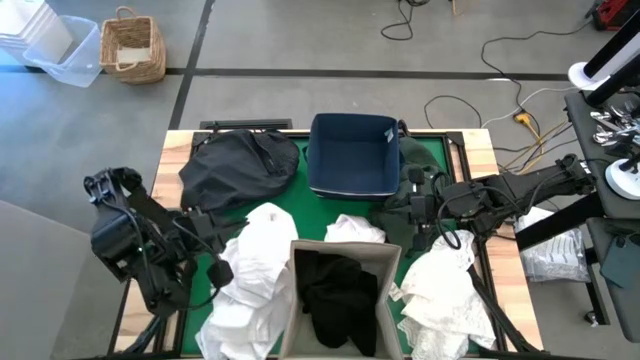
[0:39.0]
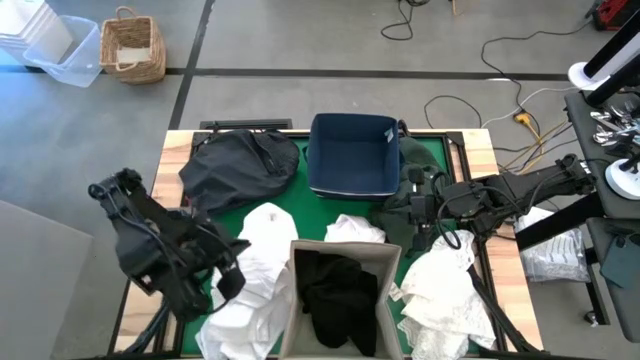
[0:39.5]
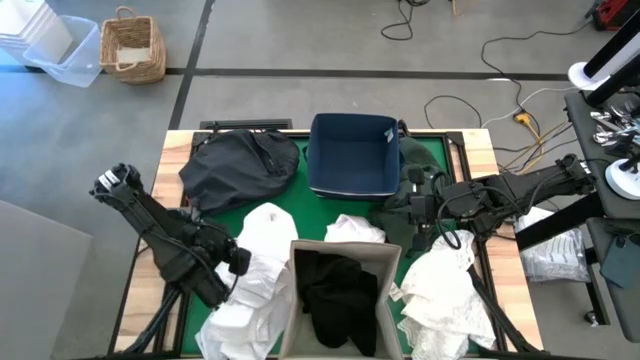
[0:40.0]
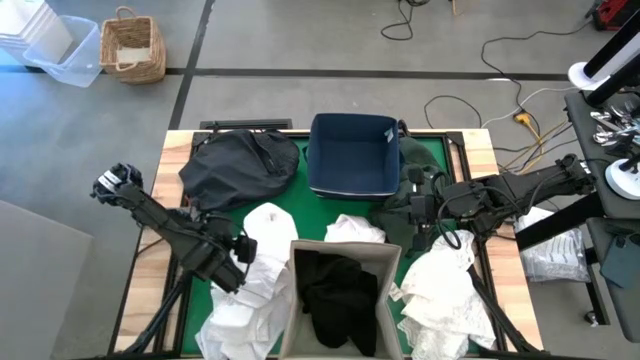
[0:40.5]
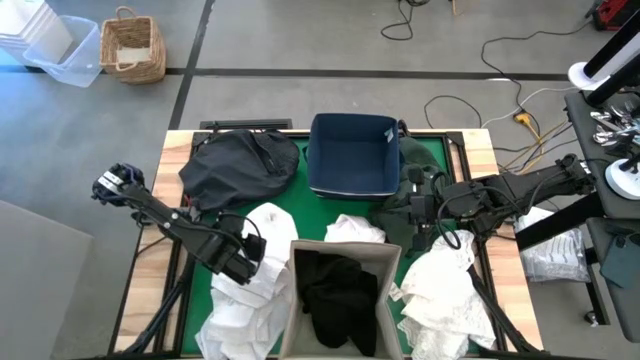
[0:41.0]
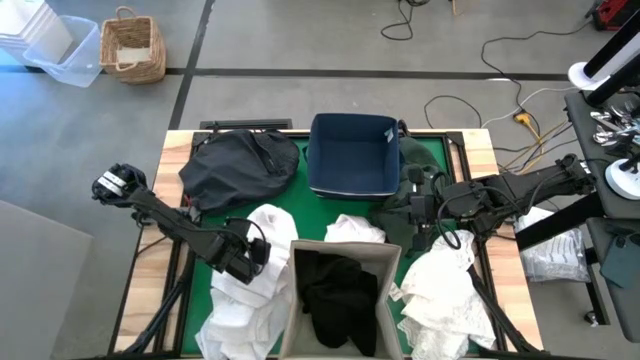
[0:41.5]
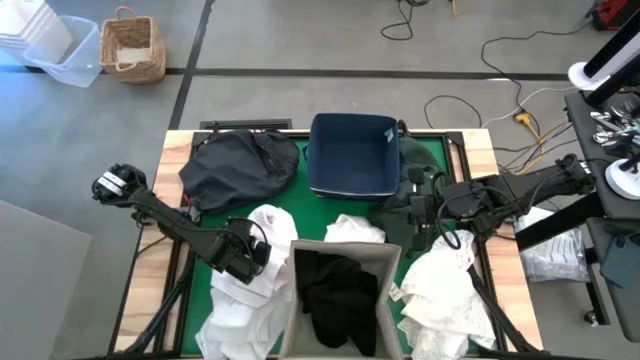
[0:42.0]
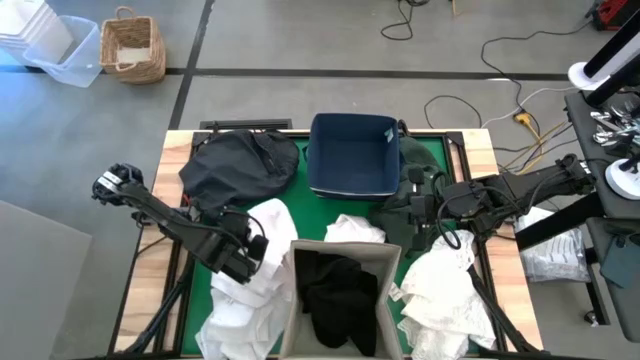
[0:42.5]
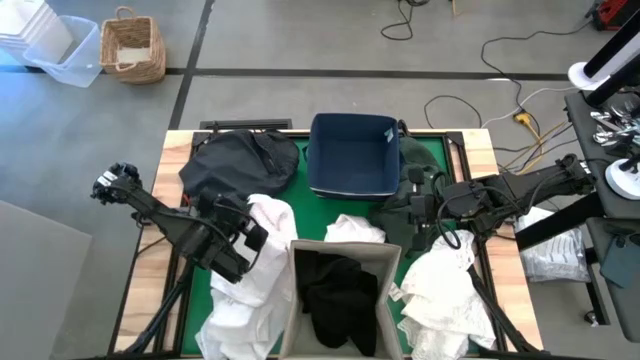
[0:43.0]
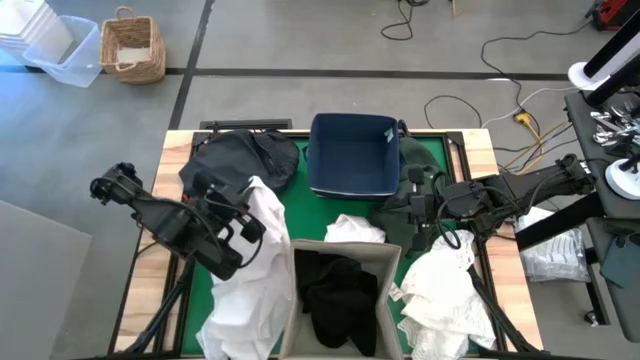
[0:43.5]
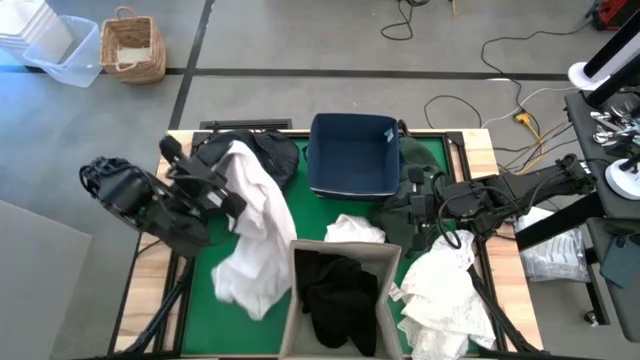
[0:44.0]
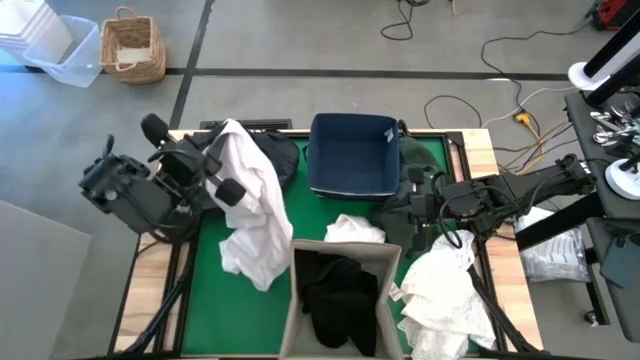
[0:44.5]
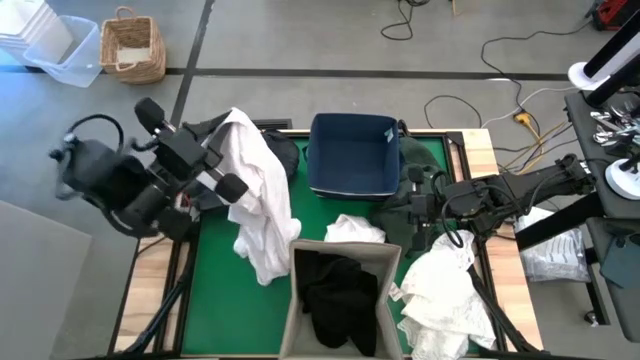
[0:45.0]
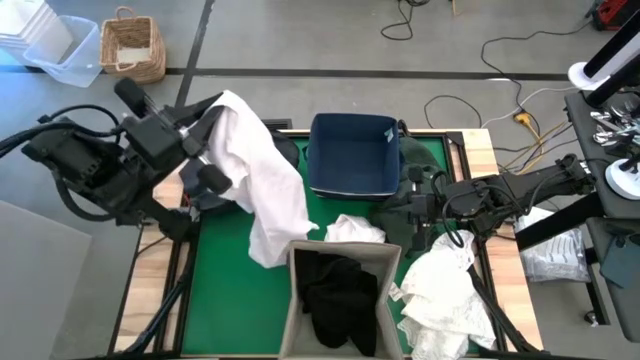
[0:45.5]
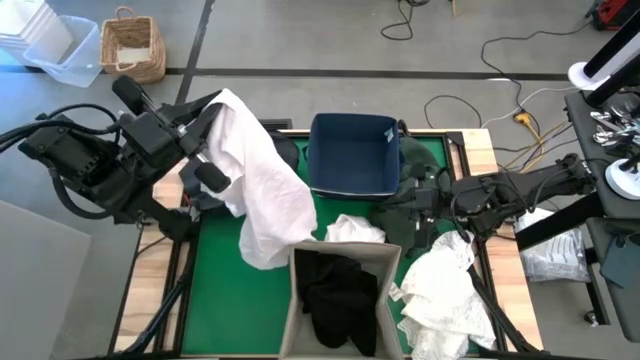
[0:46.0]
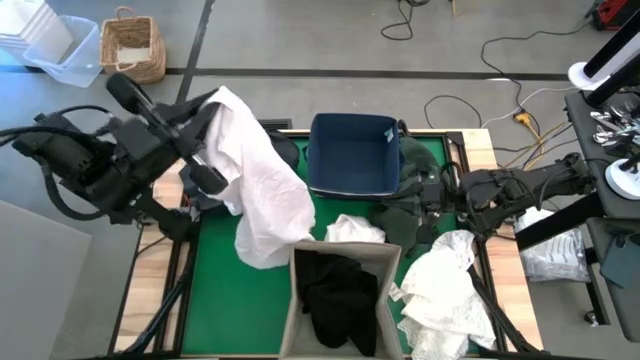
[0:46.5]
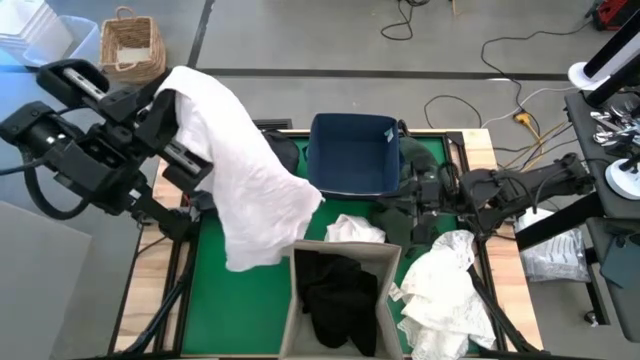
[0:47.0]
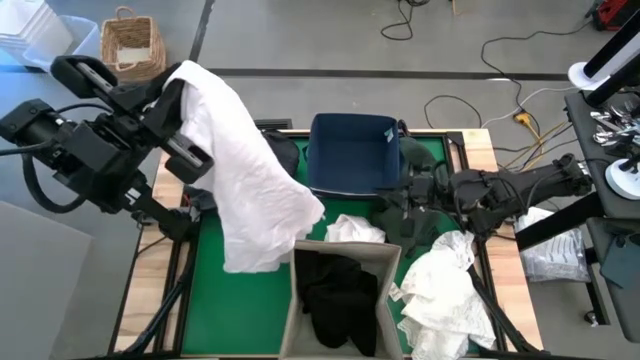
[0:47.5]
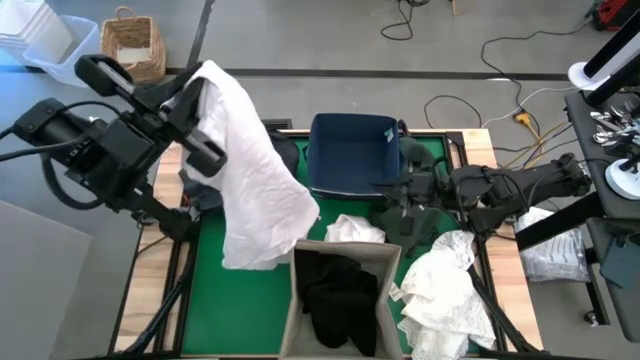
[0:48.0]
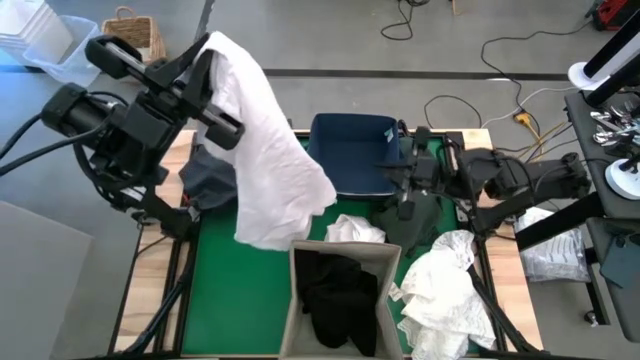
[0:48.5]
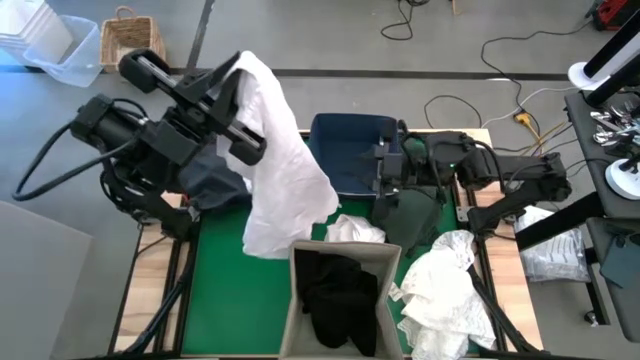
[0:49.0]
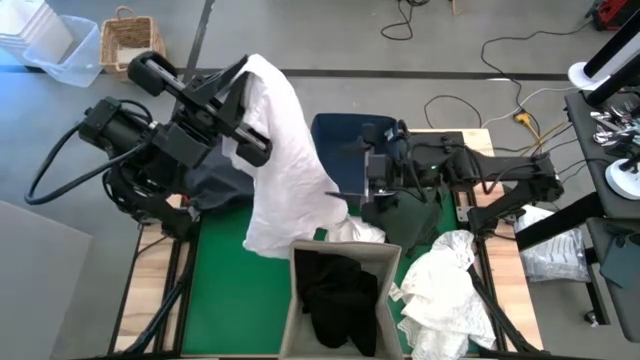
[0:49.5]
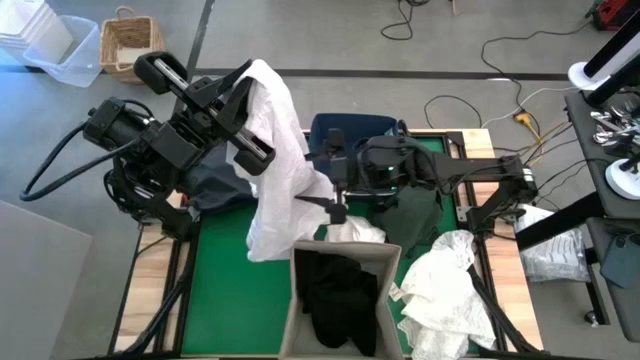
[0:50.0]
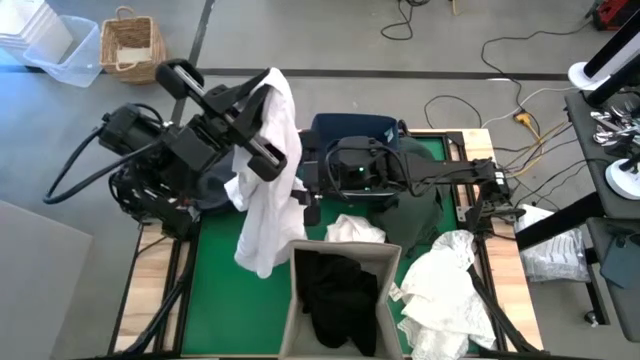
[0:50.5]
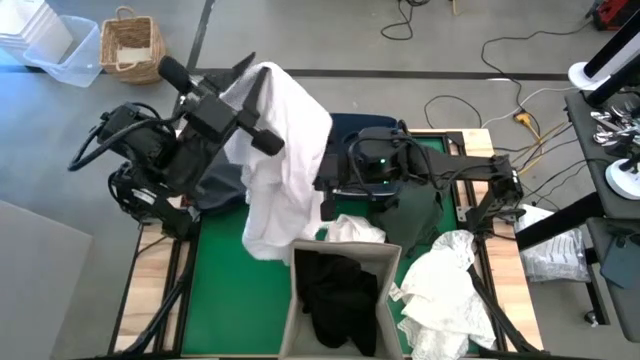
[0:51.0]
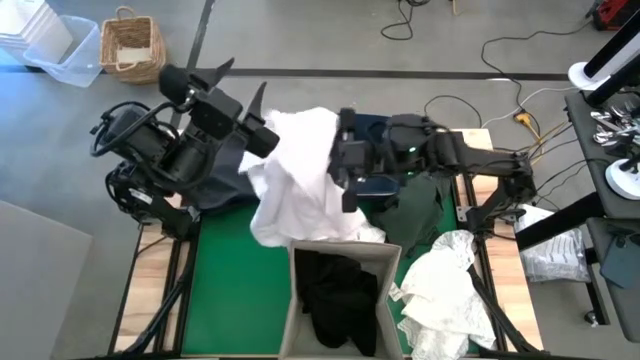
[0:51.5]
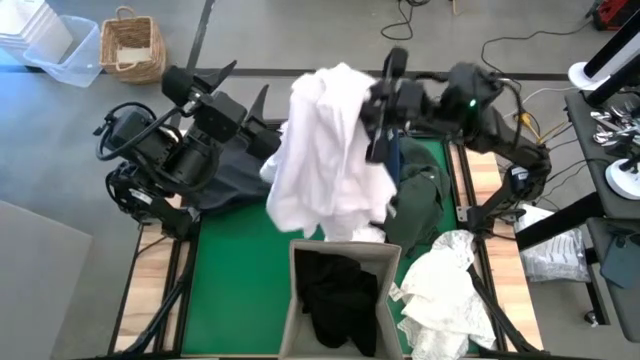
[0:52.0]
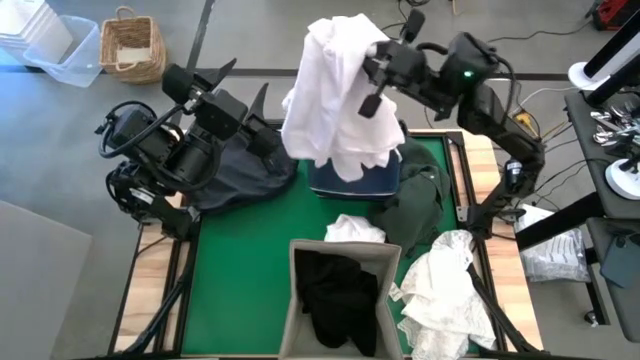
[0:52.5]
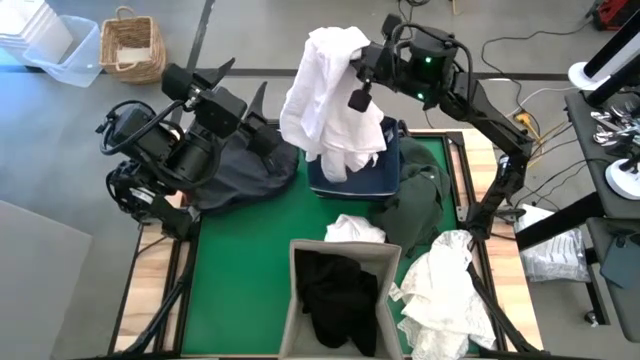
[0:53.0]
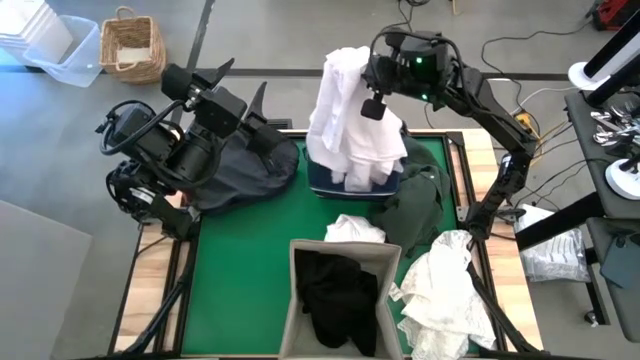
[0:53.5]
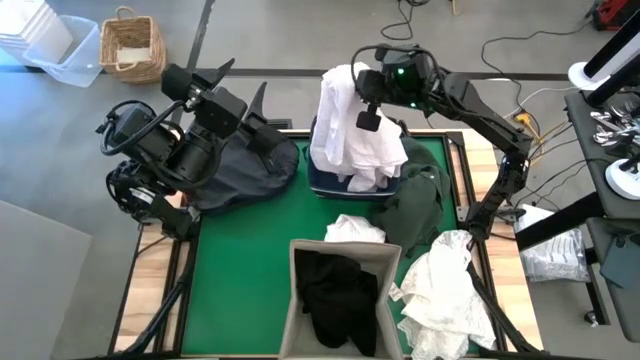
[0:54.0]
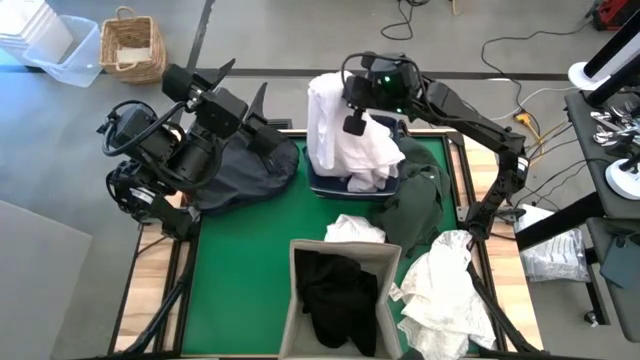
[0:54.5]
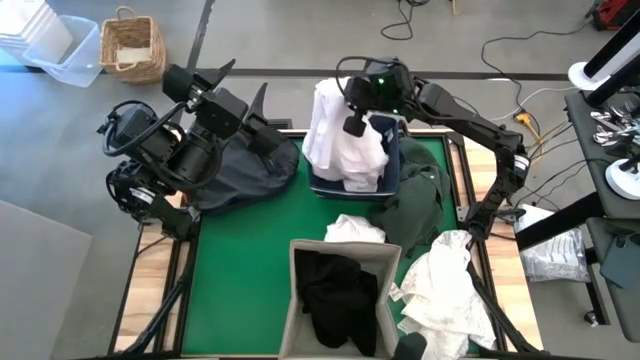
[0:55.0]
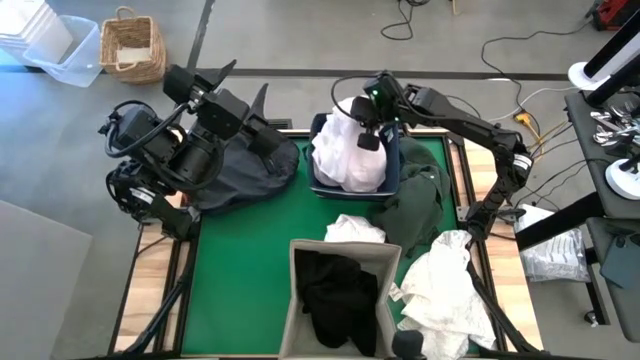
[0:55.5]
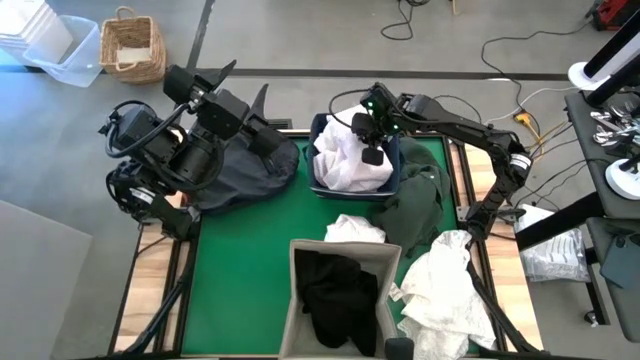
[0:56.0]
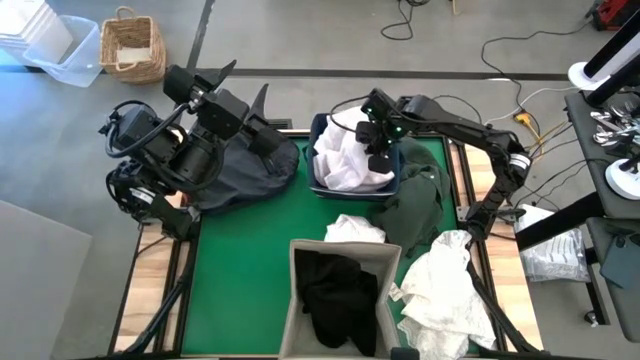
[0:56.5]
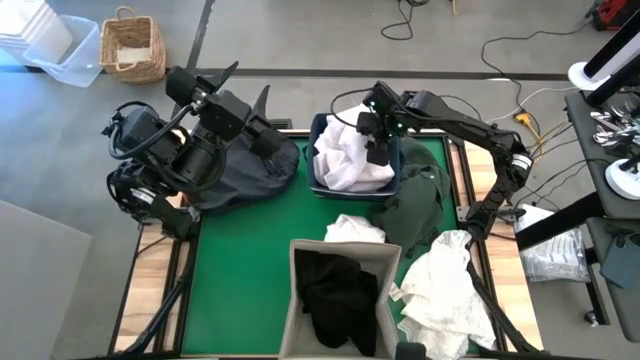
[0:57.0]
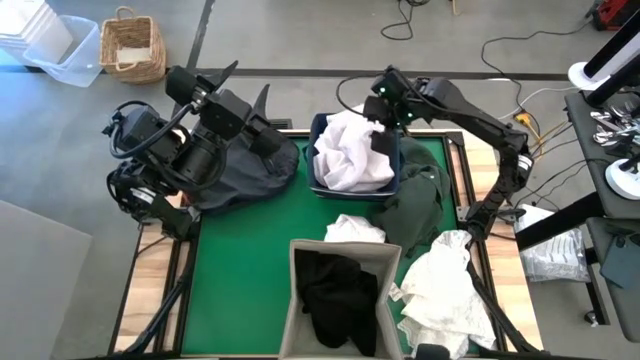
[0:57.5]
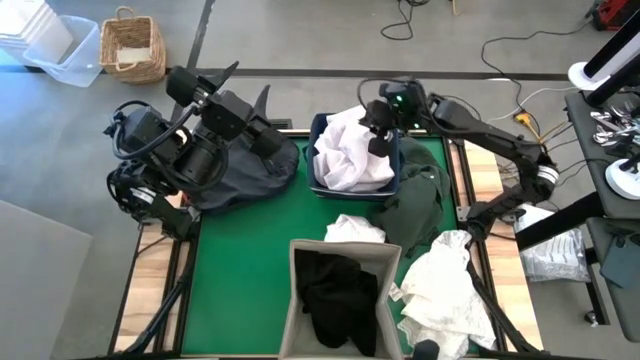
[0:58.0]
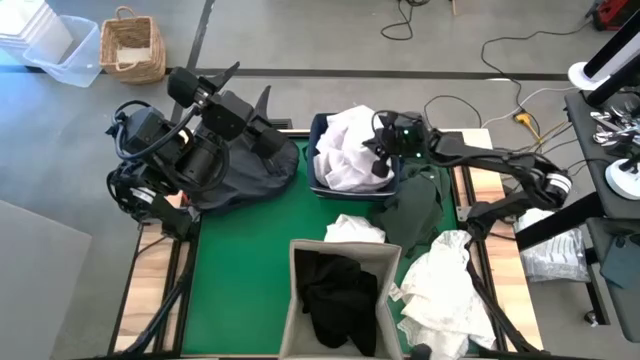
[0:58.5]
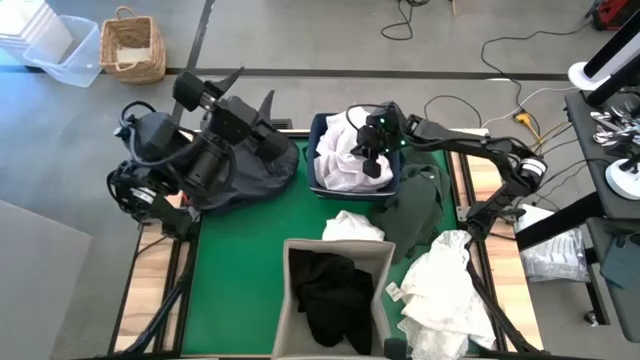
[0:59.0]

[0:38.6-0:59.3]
Put the white shirt into the blue laundry bin
